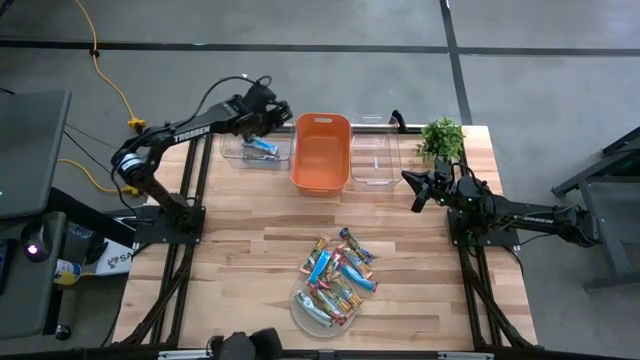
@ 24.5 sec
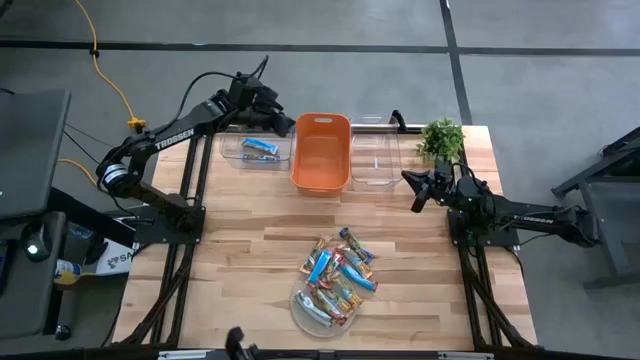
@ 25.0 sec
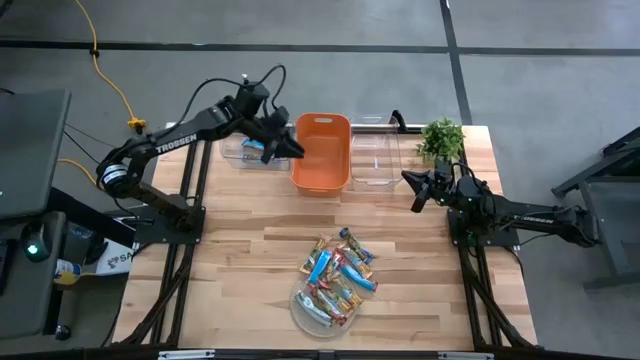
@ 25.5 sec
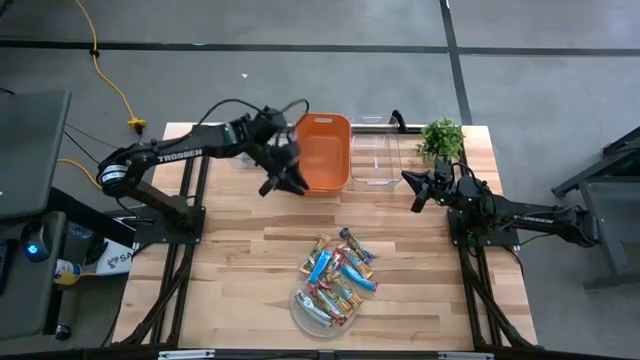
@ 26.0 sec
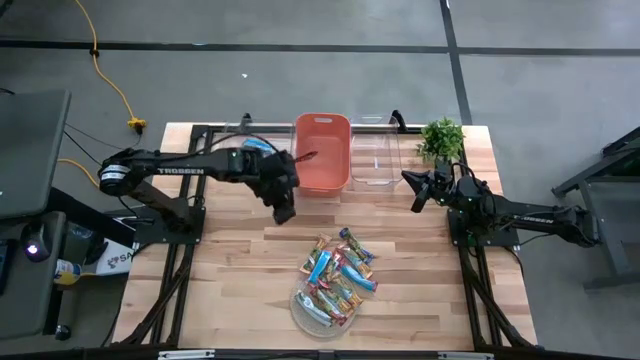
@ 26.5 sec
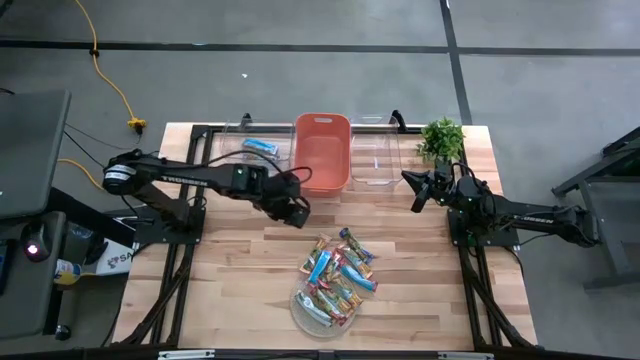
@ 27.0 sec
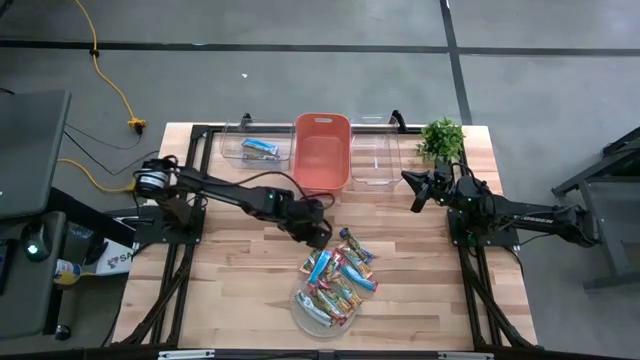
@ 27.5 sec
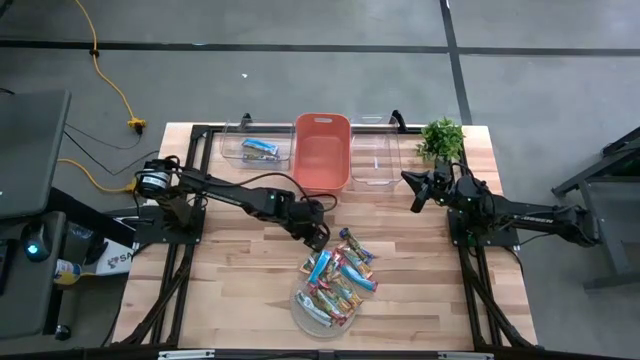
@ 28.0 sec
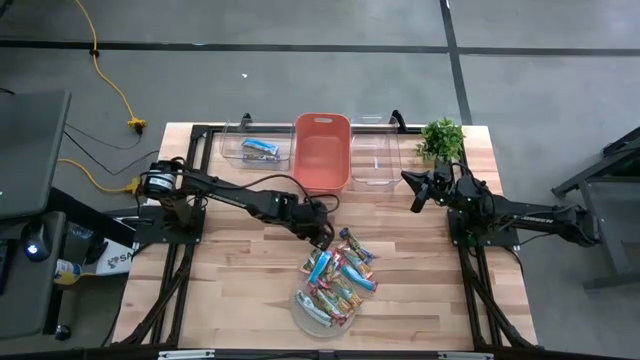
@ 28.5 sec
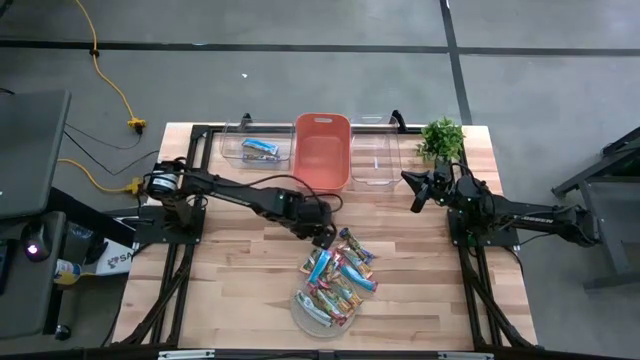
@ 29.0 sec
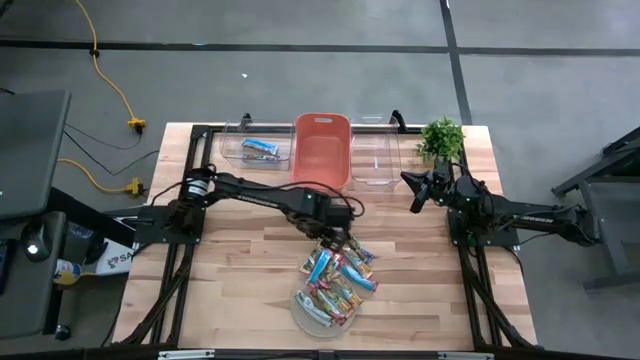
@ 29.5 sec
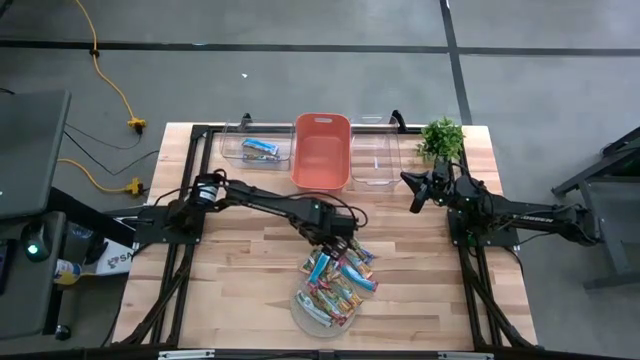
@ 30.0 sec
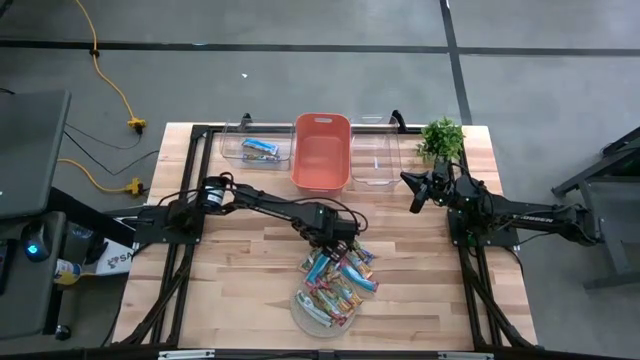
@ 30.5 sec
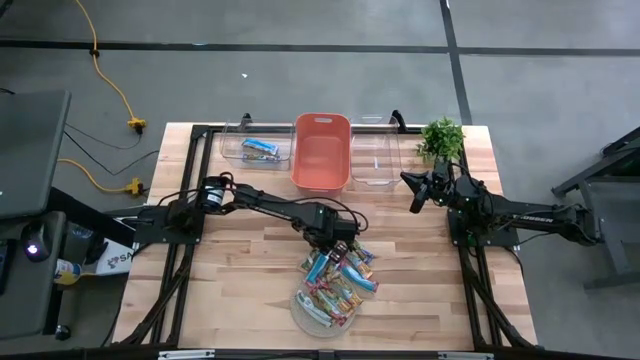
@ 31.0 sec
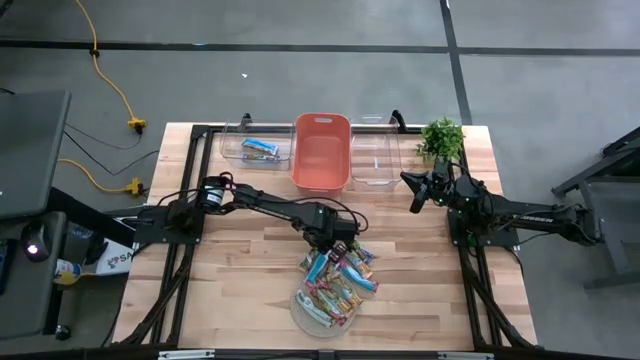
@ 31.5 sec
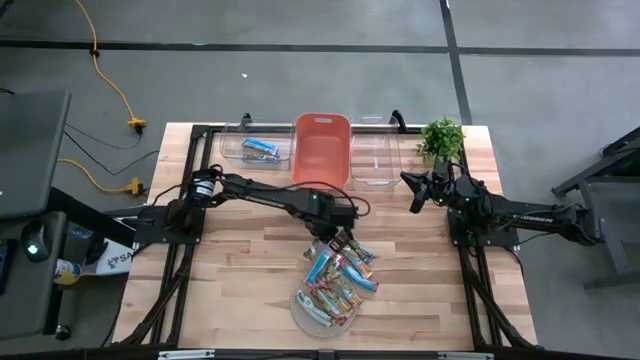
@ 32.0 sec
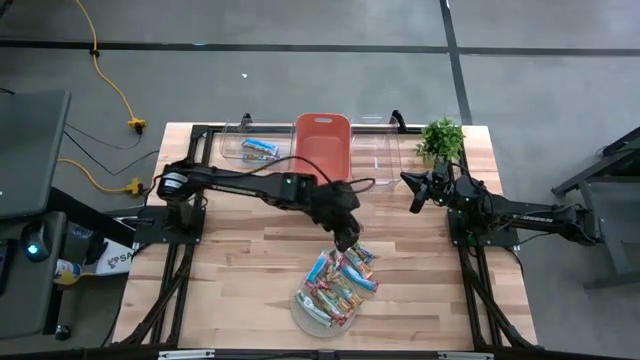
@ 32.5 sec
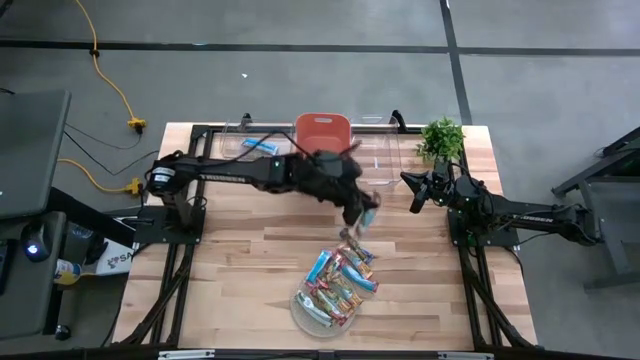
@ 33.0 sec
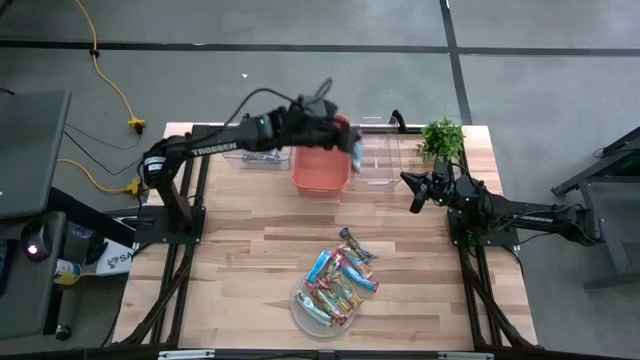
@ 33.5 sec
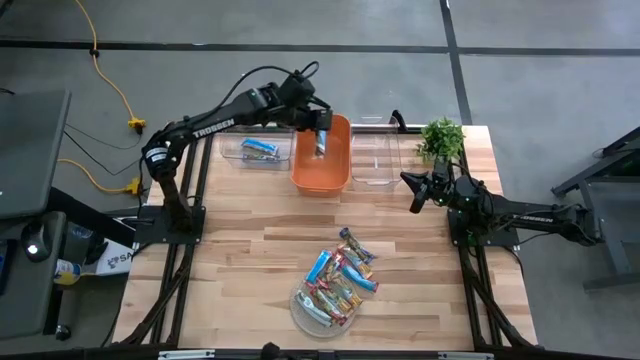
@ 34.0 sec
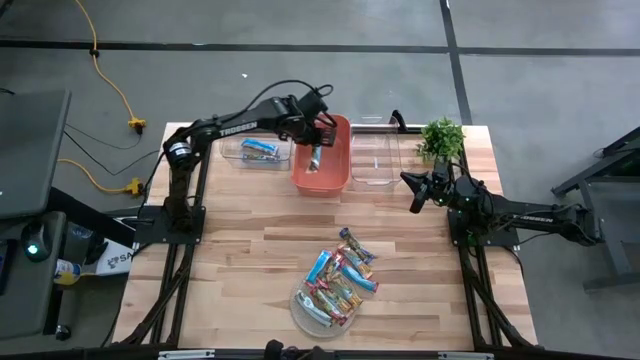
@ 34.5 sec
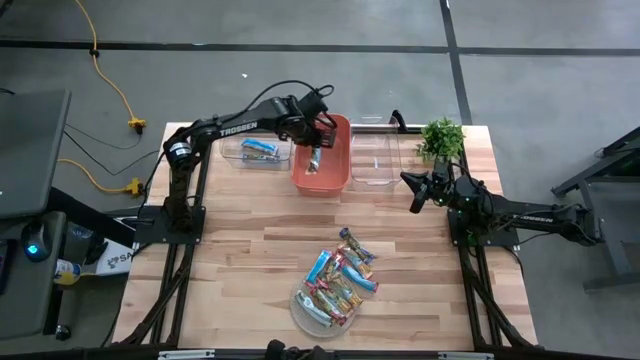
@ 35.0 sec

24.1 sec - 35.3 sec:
Task: Pick and place Granola Bars by type
Put the yellow granola bar into the orange bin

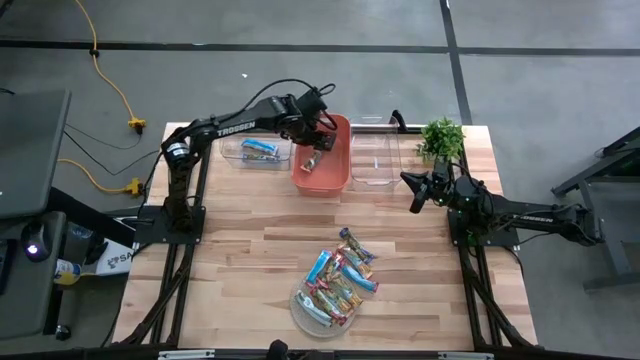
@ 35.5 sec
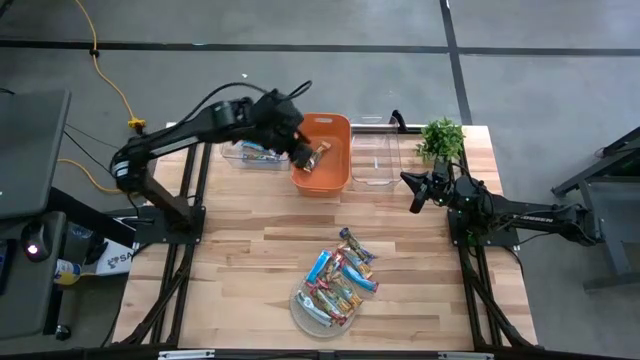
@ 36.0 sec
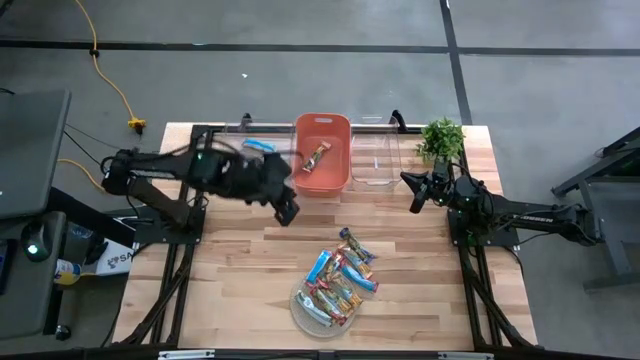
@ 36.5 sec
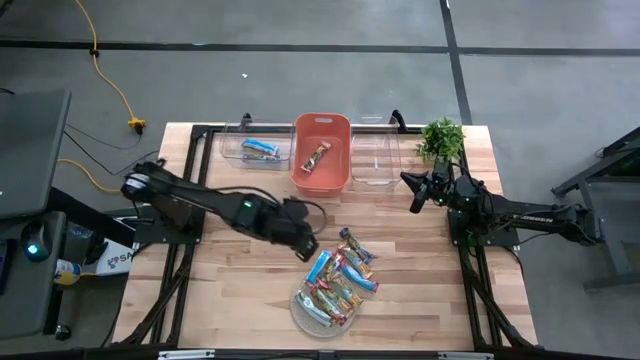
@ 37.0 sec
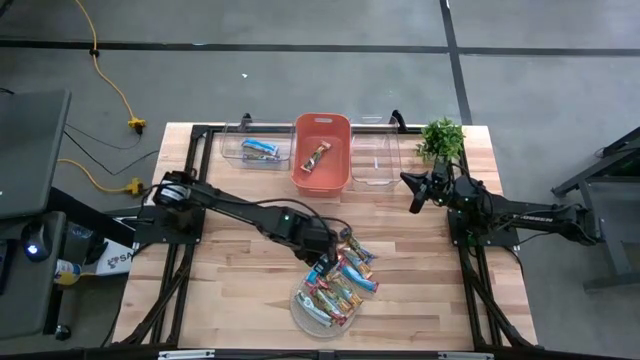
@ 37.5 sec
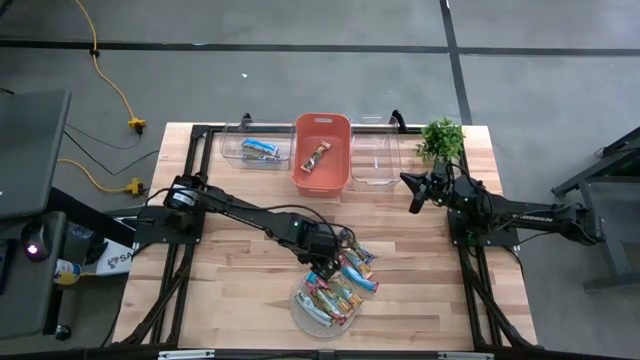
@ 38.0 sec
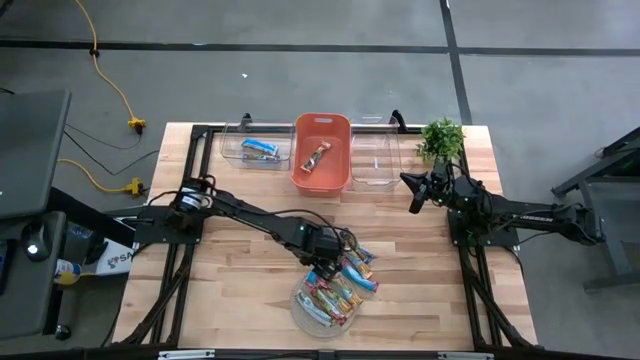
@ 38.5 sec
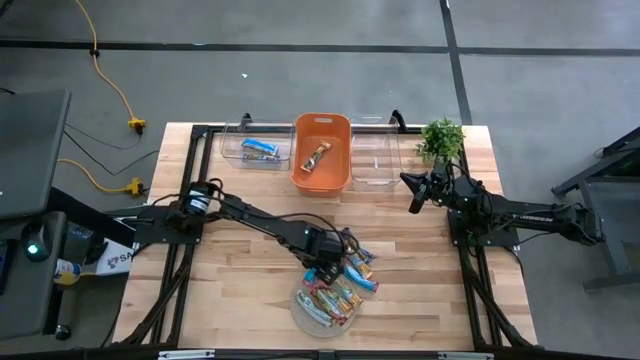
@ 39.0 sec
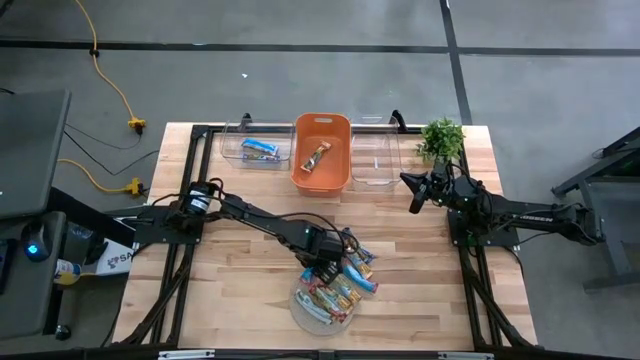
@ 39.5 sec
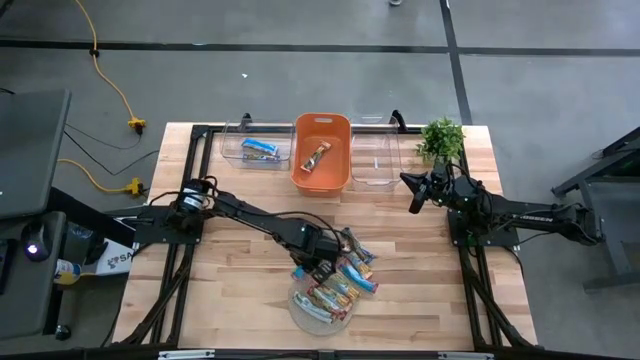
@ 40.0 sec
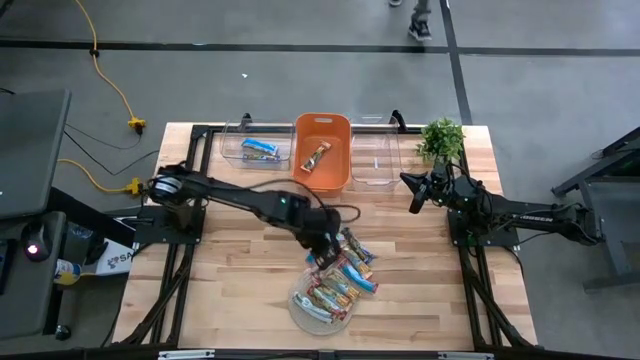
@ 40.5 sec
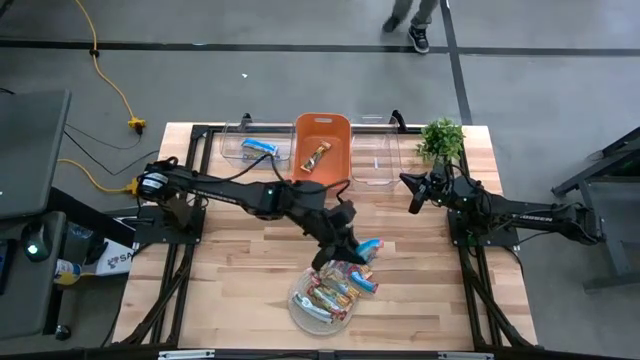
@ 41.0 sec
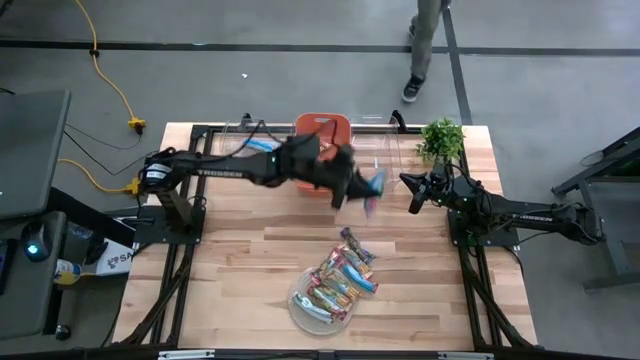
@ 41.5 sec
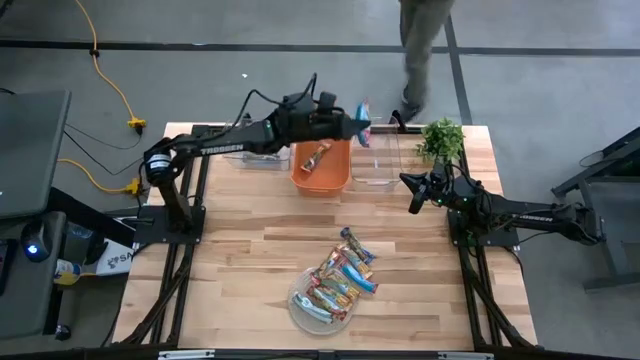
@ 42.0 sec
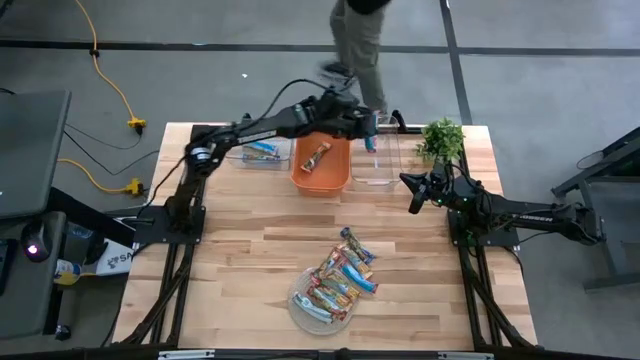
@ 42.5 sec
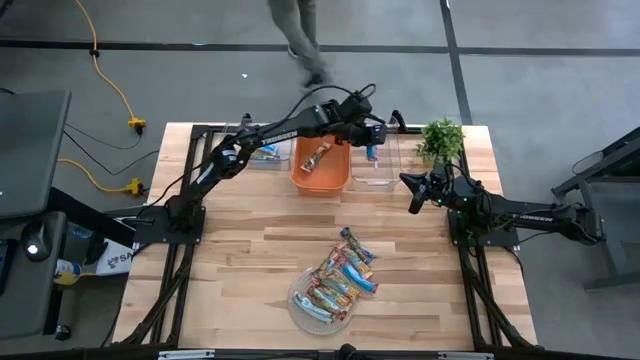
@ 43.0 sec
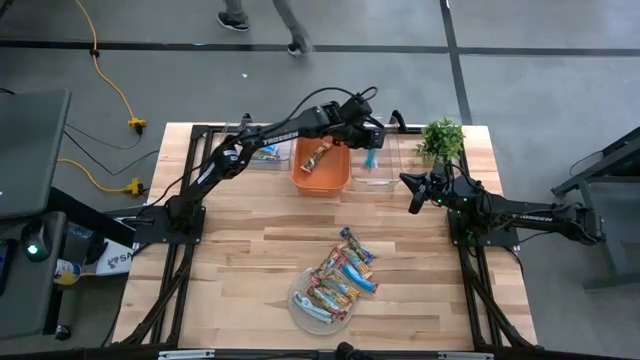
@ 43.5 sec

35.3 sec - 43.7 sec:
Put the red granola bar into the right transparent bin

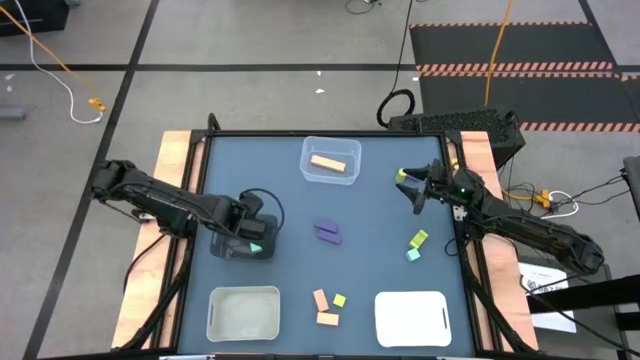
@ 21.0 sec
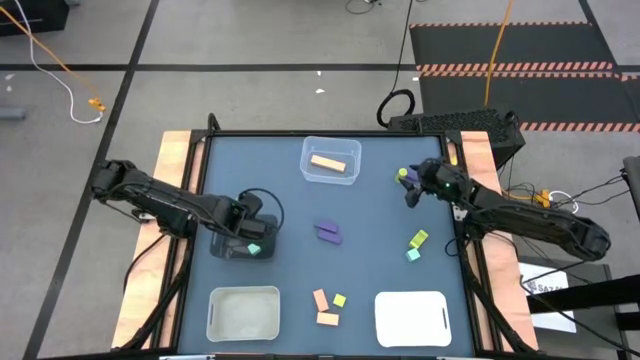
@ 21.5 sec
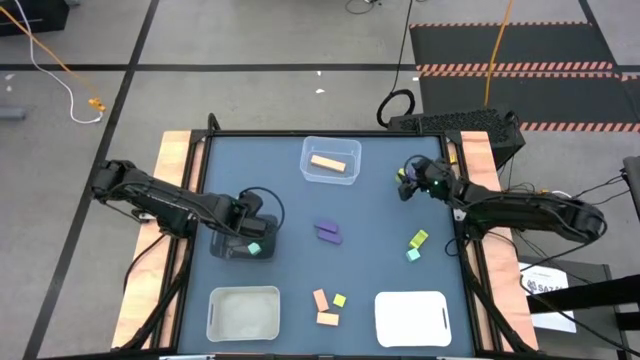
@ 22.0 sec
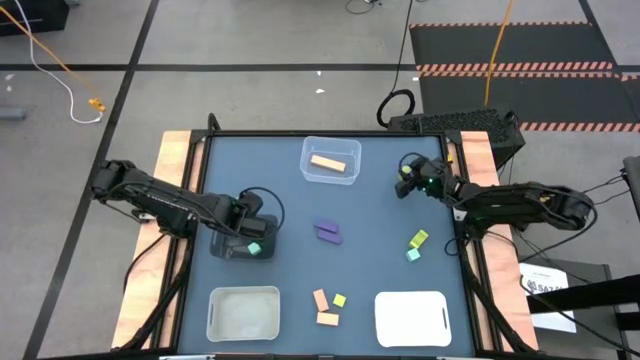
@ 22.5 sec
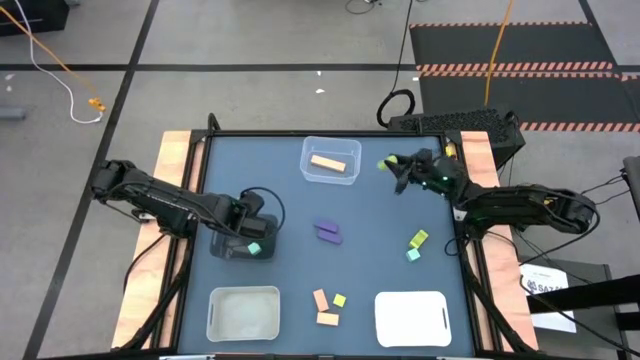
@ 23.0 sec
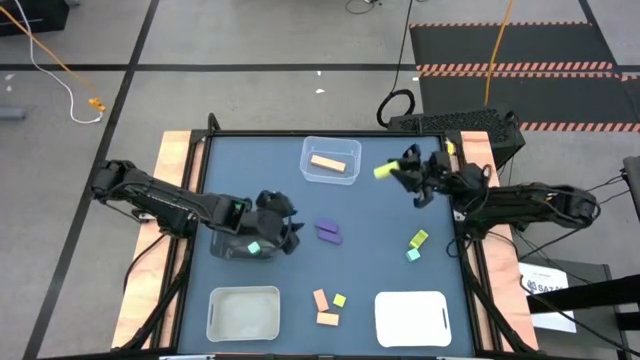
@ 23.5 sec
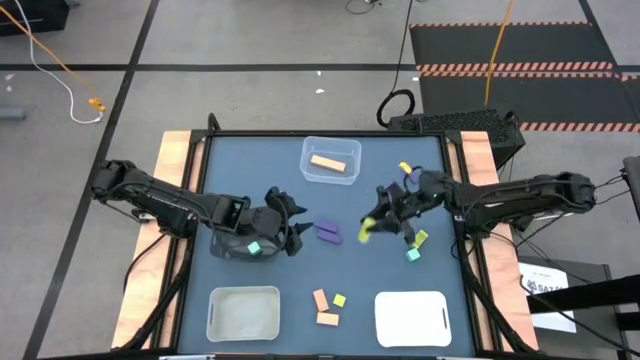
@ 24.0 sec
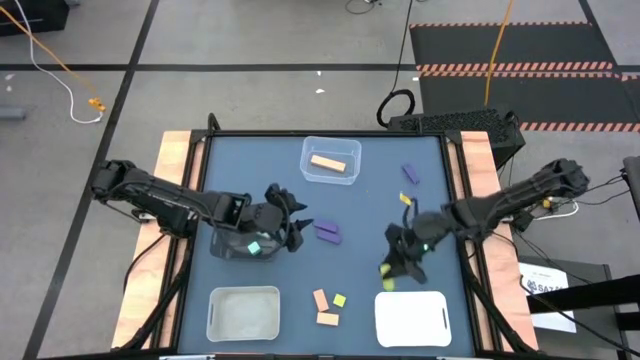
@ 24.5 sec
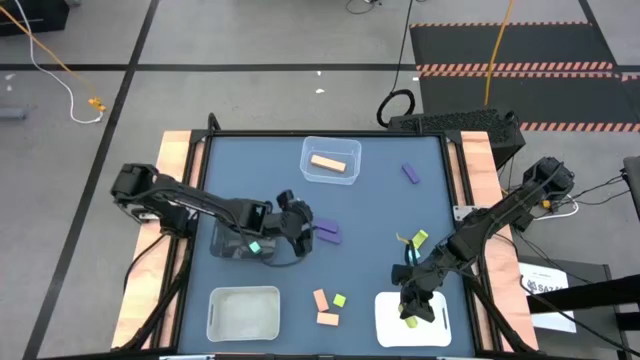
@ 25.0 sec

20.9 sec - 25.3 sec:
Task: Sort & place blocks by color
Put the top right green blocks into the white bin
